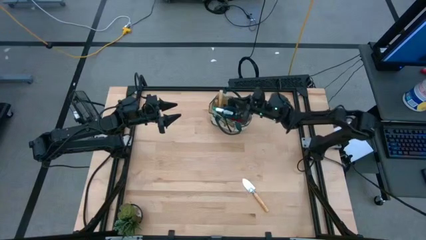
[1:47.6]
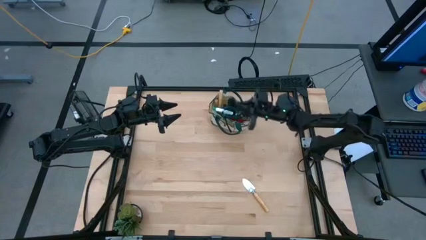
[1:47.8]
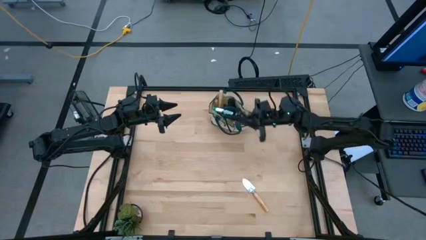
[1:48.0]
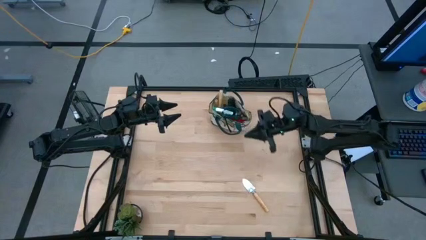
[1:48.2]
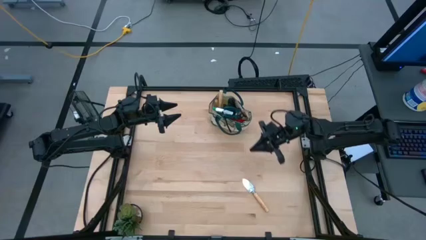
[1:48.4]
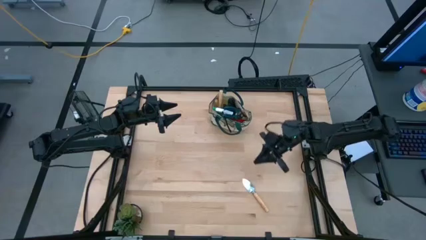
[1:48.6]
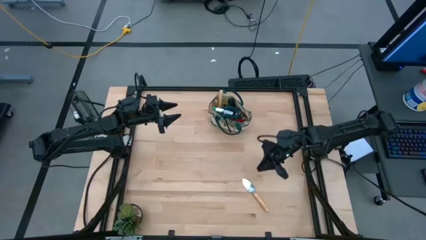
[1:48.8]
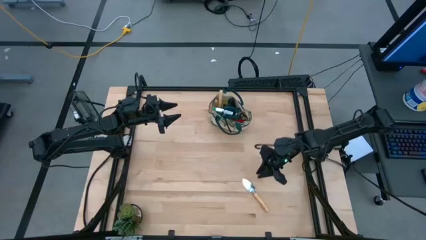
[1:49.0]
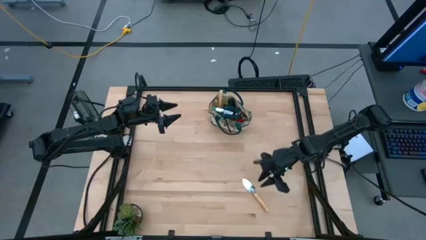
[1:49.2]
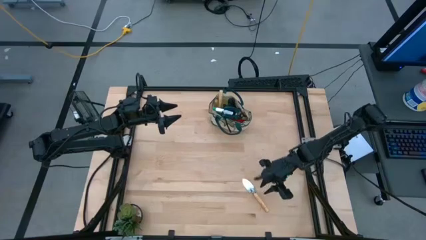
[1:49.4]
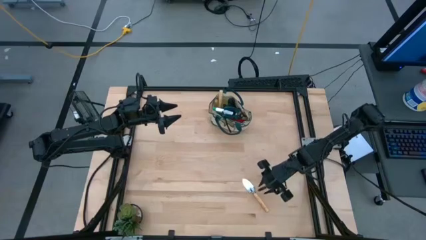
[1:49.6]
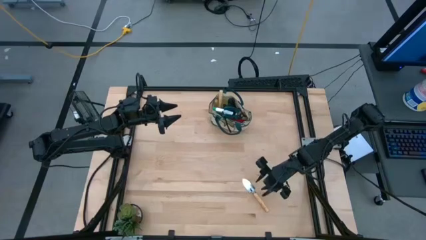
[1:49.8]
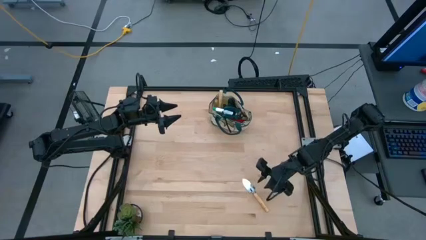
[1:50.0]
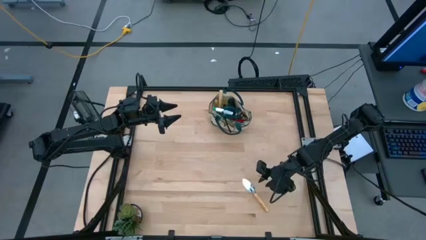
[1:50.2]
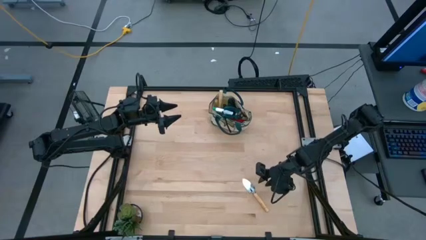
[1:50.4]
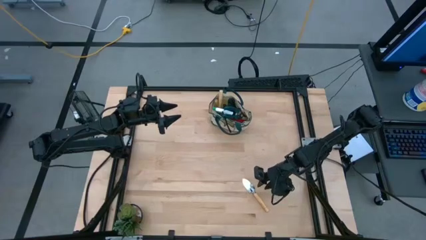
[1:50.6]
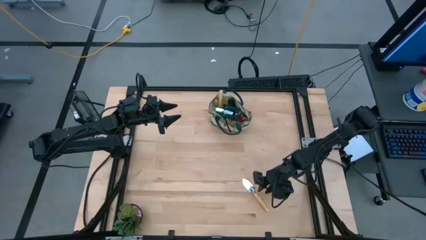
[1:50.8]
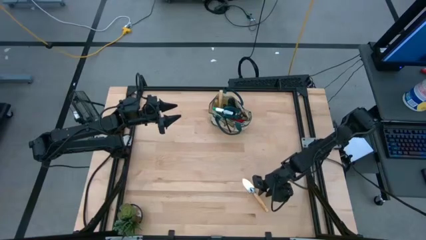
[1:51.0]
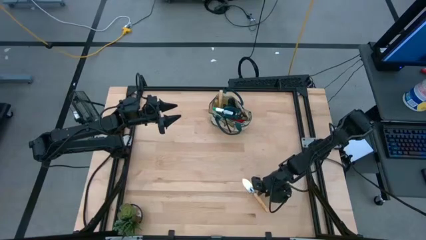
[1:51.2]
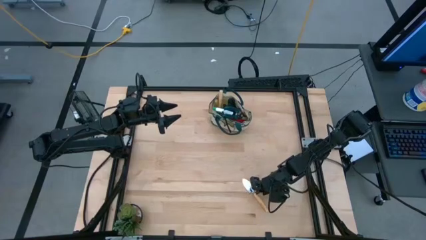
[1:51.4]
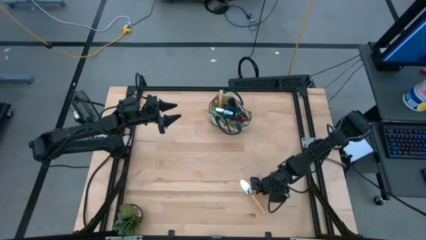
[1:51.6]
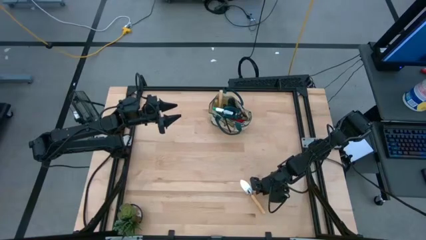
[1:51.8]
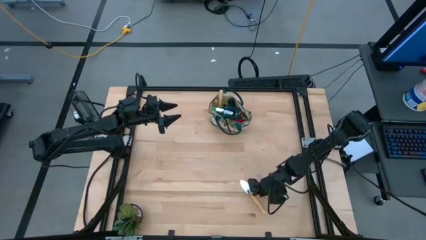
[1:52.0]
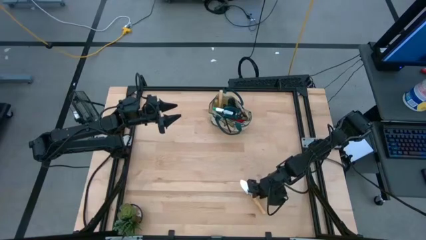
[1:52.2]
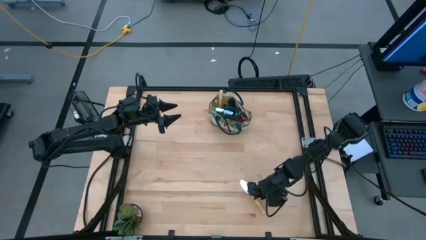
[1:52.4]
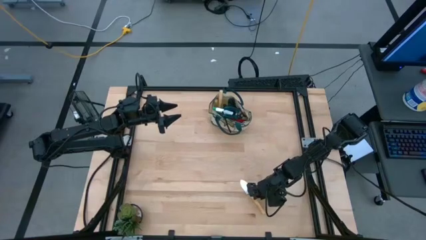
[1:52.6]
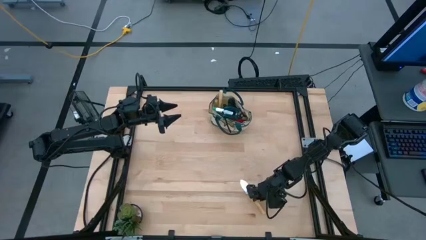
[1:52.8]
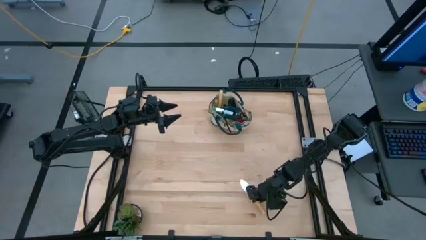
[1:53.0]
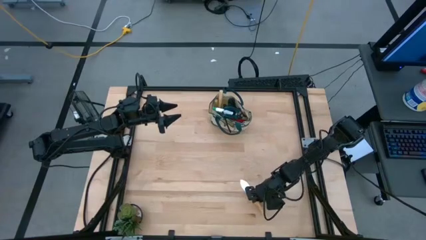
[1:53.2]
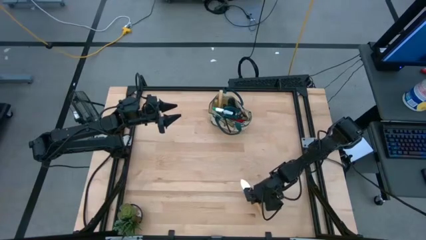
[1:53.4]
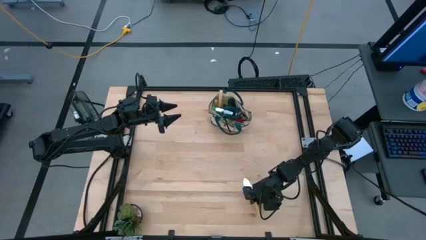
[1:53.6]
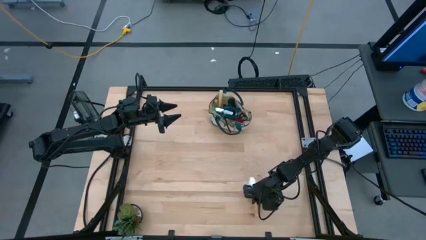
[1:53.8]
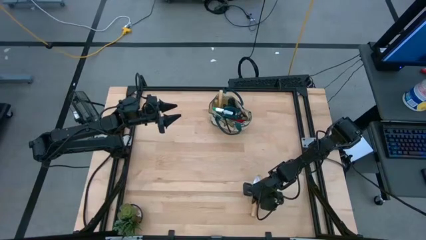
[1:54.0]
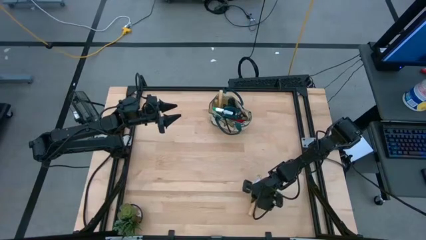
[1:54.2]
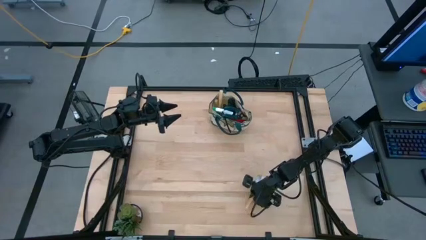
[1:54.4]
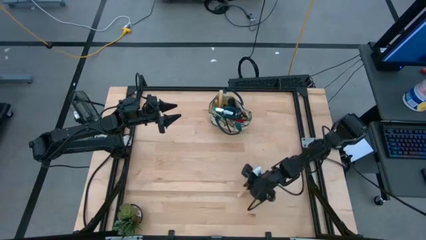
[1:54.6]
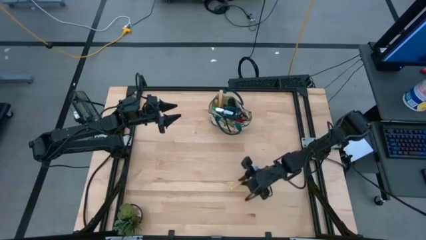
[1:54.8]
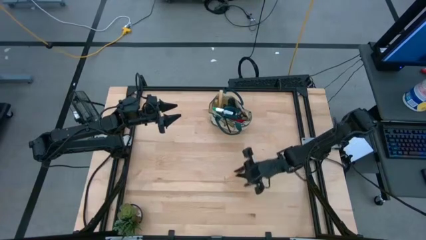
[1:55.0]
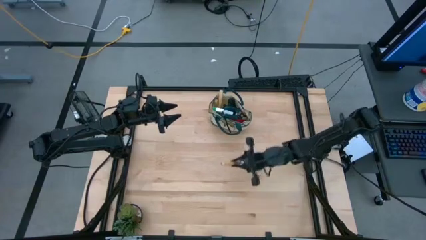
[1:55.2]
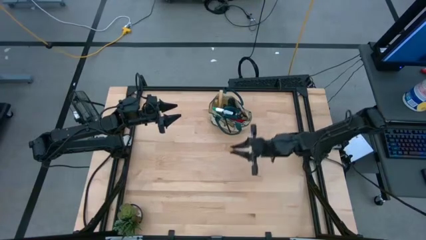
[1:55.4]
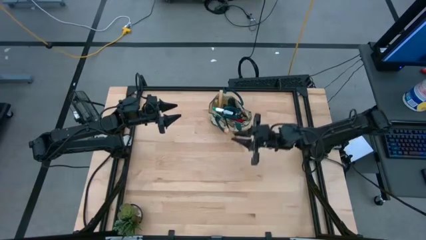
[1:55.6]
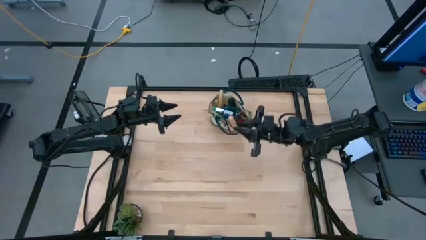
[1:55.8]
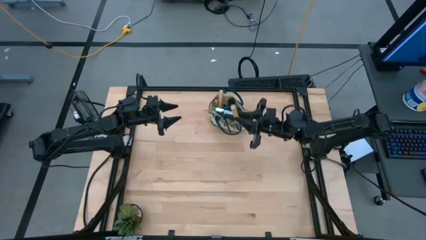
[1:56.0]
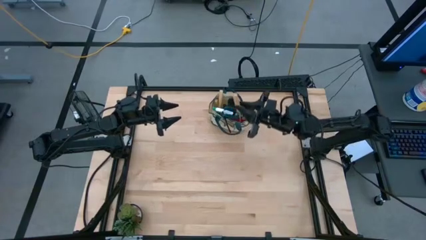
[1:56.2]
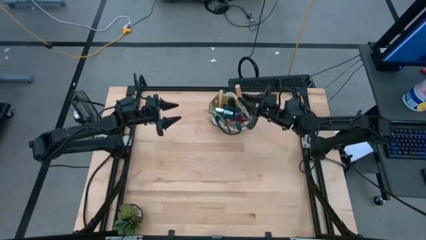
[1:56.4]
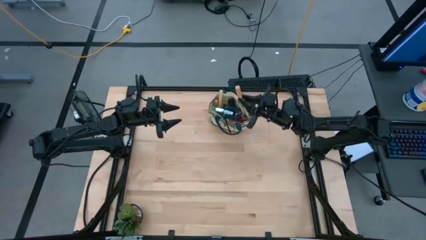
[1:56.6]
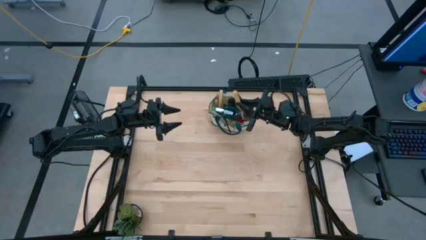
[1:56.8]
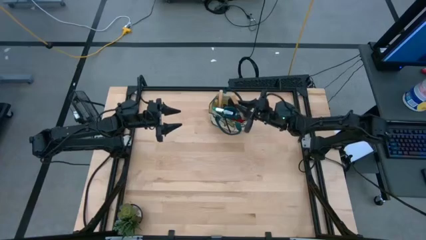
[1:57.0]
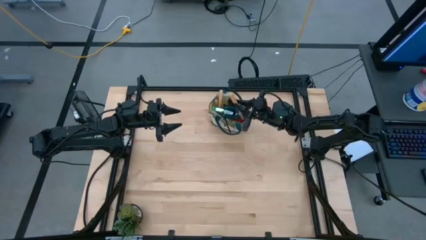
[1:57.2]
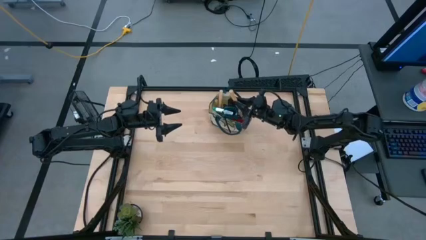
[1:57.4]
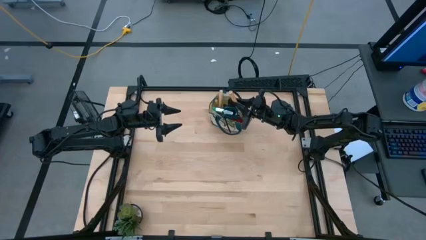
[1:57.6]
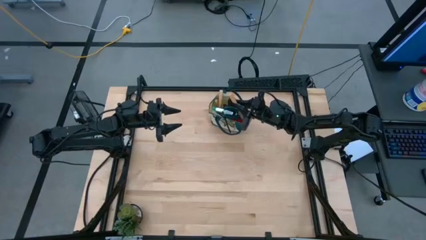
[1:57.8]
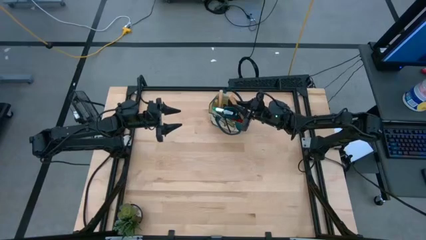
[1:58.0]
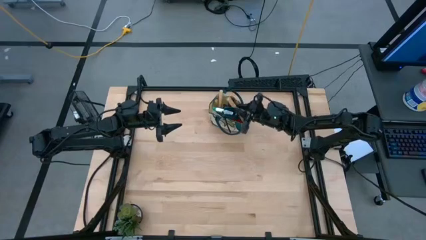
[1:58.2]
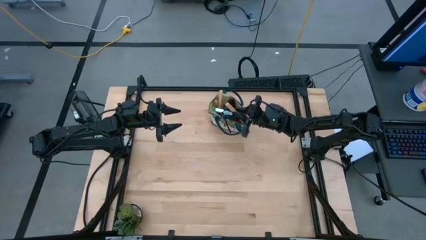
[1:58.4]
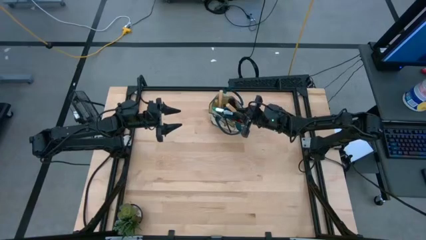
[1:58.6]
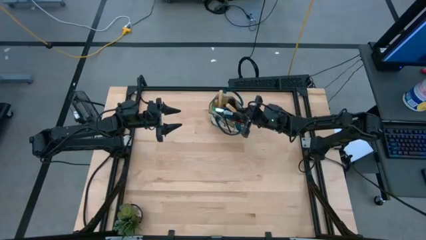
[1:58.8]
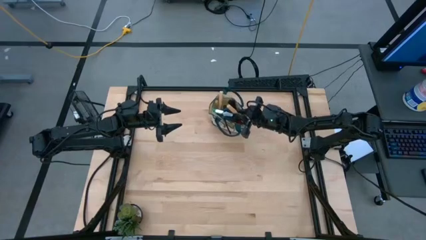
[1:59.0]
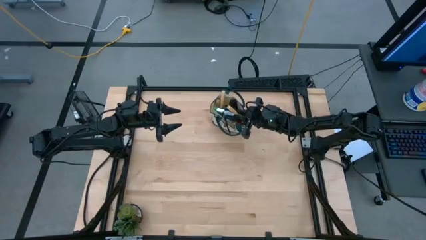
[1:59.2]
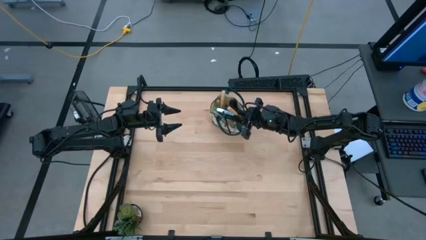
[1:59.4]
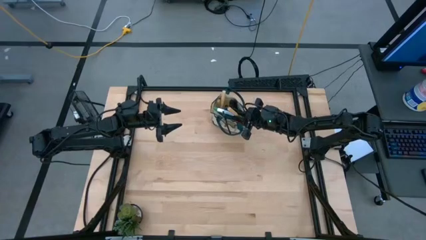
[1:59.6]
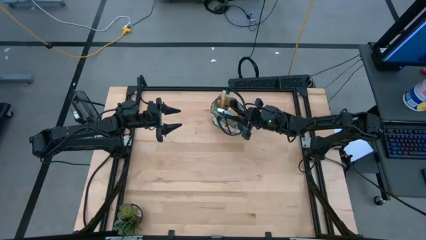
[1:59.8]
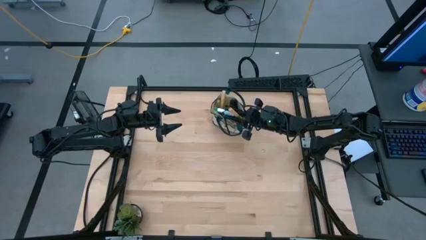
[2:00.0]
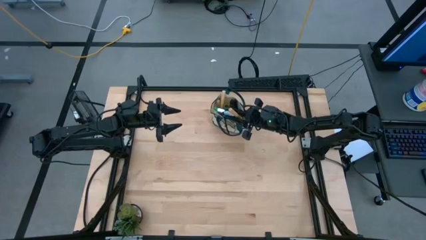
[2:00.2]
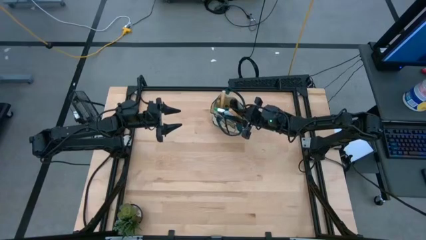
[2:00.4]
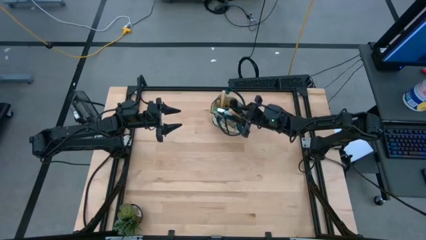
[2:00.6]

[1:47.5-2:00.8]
Task: Pick & Place Garden tools in Gardening bag
Put the brown trowel into the green gardening bag

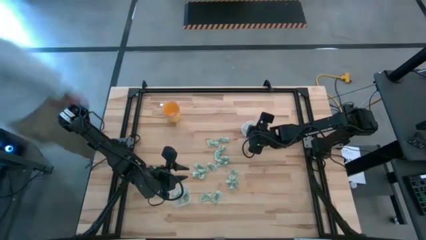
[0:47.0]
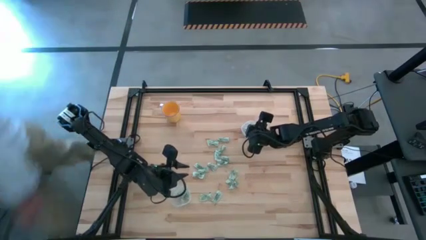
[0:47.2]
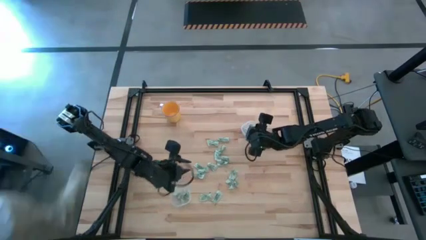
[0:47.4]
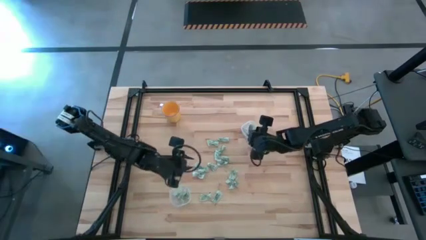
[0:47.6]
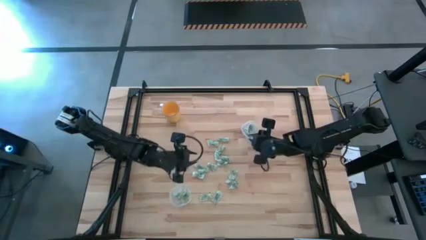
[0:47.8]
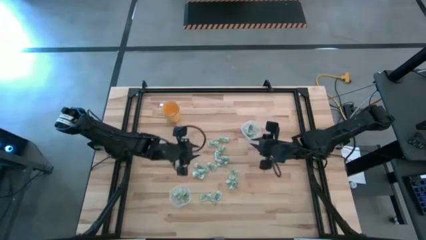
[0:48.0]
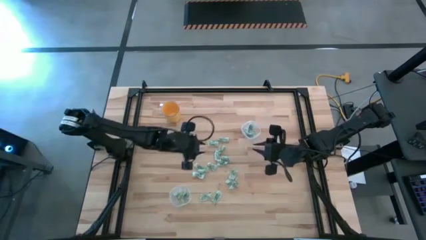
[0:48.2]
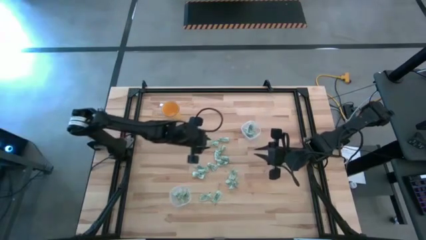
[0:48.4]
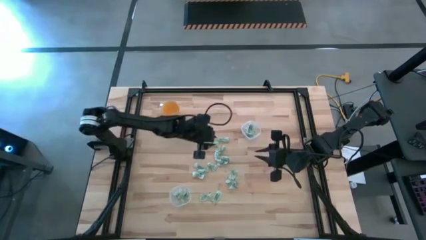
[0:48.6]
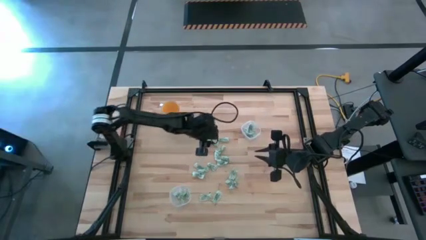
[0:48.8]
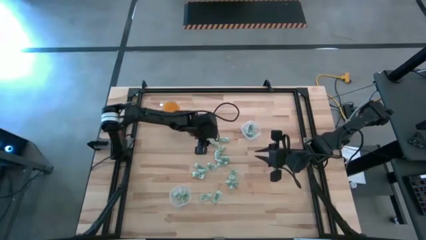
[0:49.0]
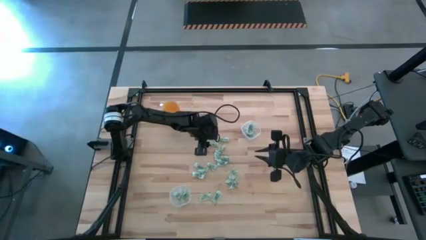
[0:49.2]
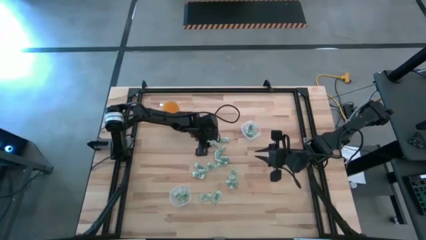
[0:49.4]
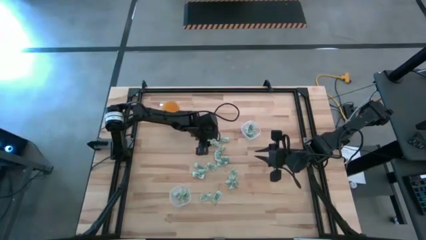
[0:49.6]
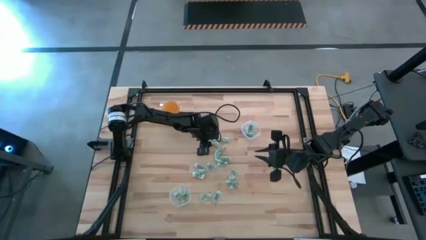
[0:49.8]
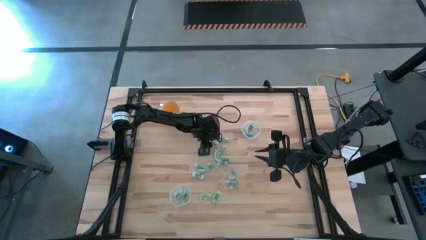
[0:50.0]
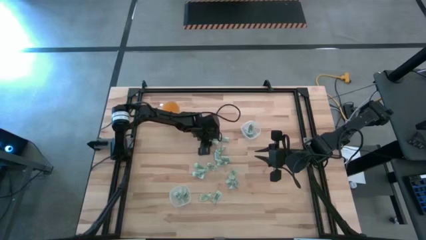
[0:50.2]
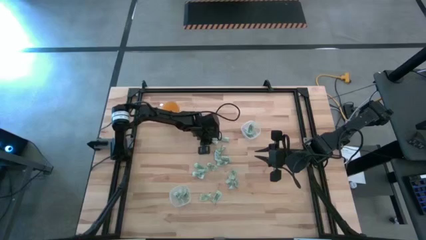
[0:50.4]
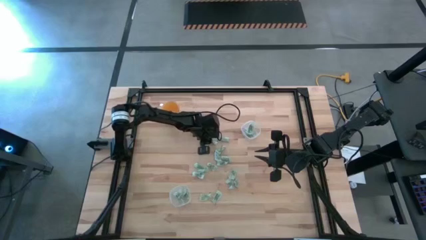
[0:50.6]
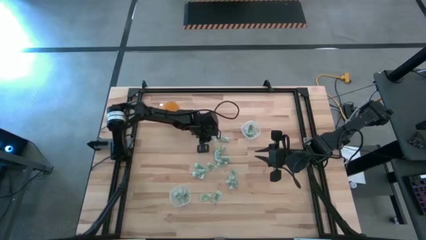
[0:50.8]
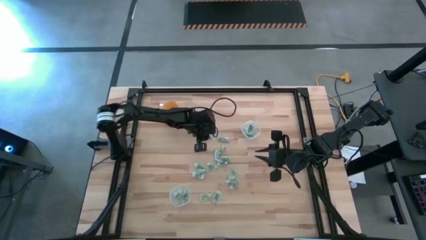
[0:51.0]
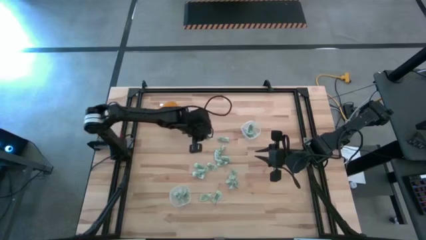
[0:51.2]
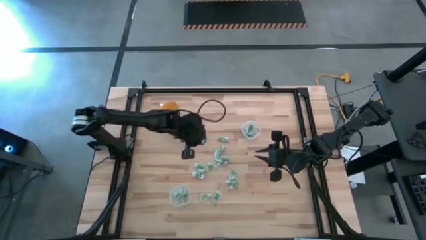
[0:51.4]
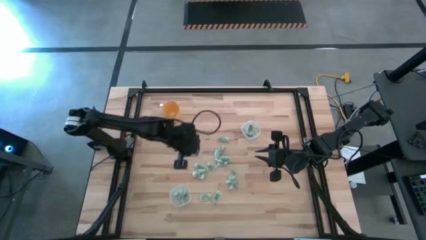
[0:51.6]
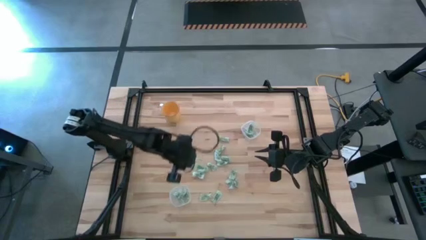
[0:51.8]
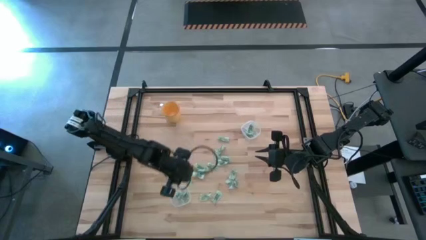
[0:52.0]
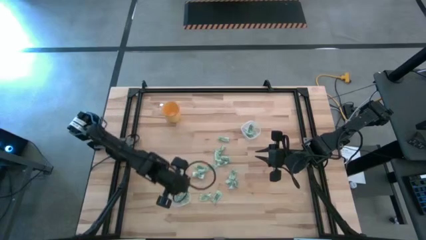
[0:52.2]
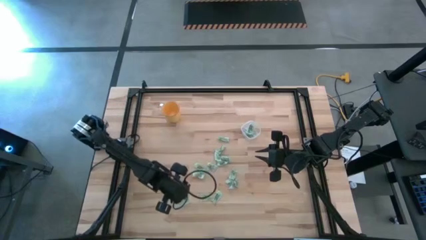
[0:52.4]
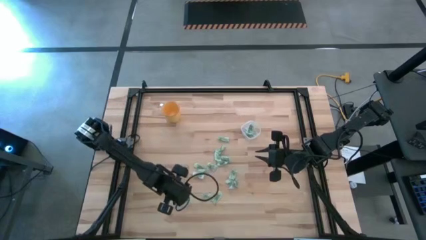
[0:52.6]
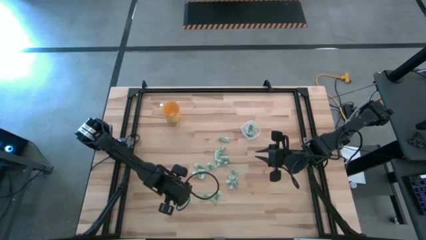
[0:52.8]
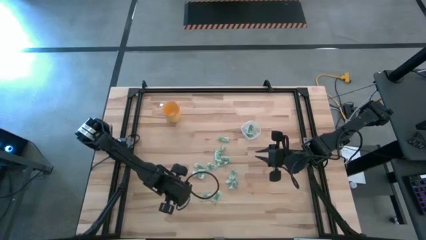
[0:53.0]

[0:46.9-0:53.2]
Task: Pick and place Stevia / Truvia into bins
Put the green stevia packet into the bottom transparent container
